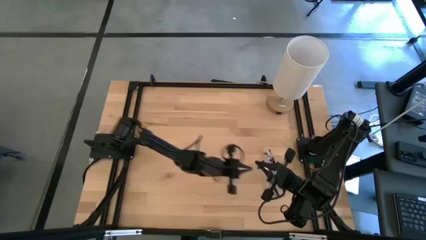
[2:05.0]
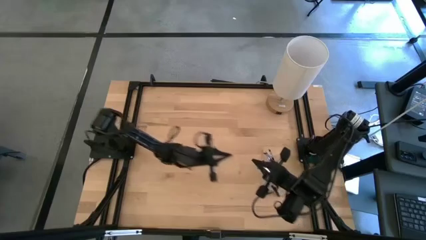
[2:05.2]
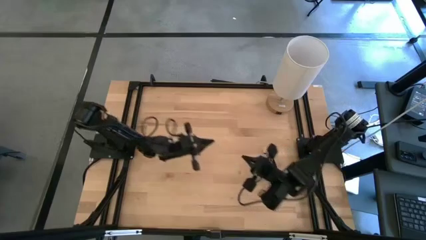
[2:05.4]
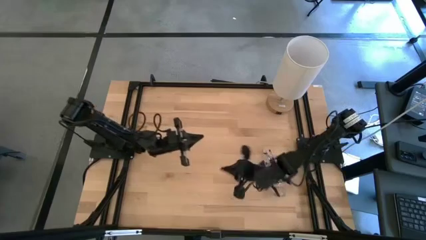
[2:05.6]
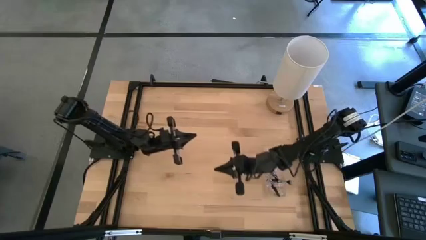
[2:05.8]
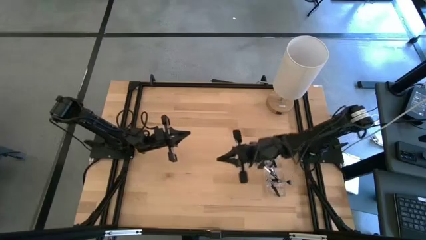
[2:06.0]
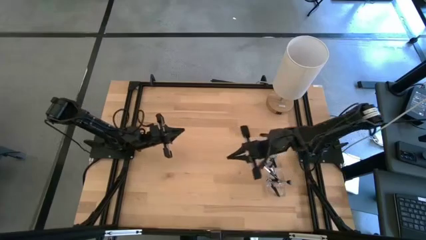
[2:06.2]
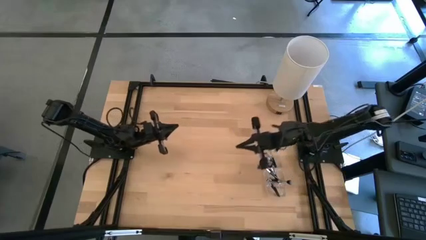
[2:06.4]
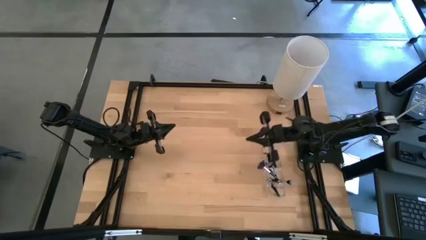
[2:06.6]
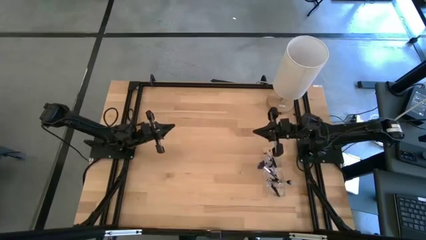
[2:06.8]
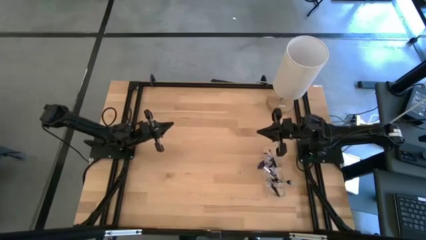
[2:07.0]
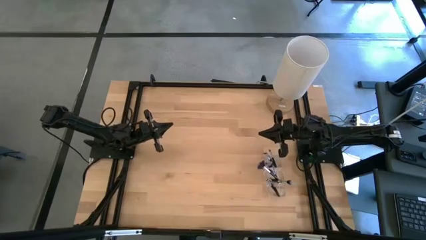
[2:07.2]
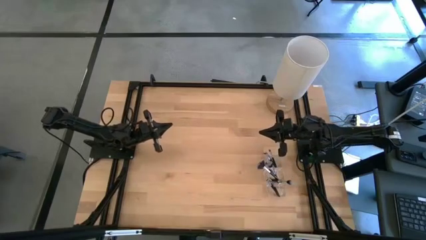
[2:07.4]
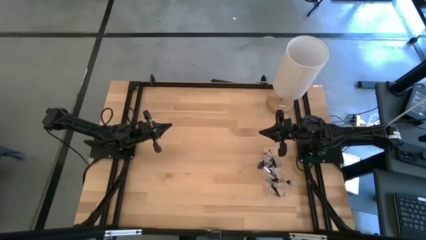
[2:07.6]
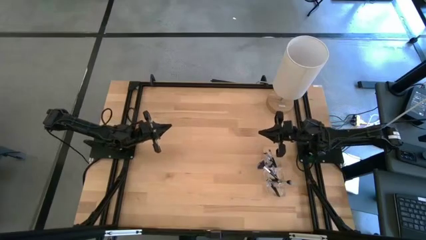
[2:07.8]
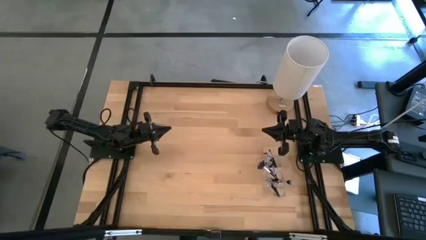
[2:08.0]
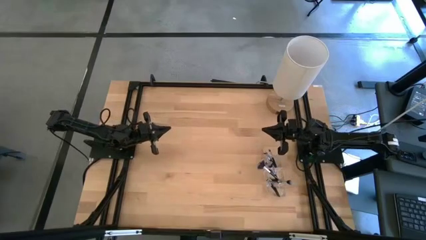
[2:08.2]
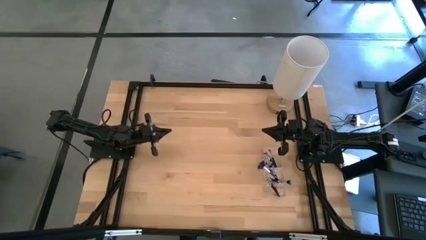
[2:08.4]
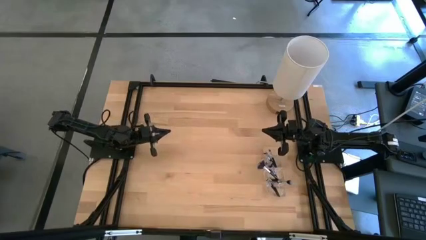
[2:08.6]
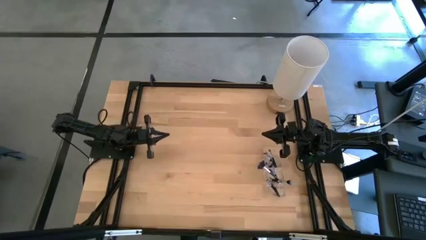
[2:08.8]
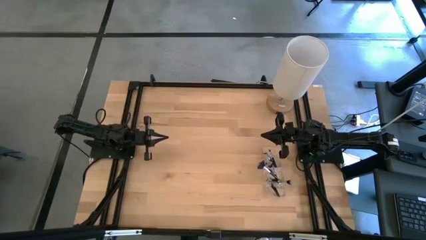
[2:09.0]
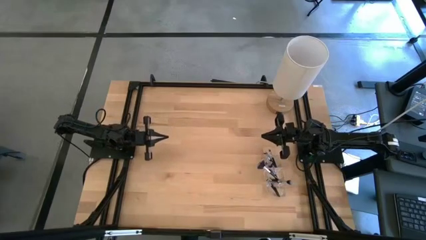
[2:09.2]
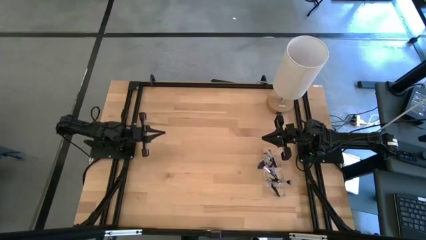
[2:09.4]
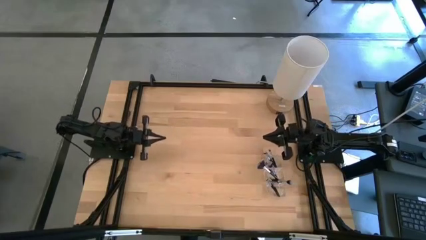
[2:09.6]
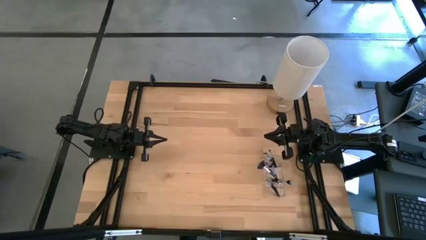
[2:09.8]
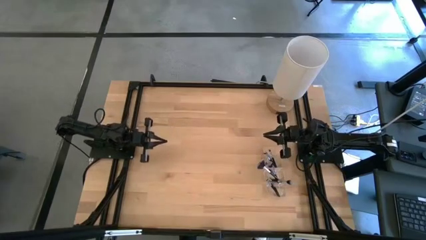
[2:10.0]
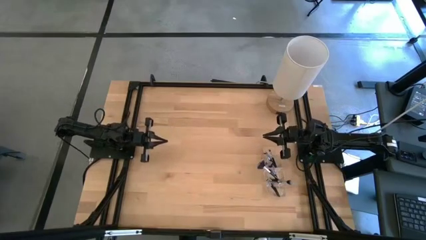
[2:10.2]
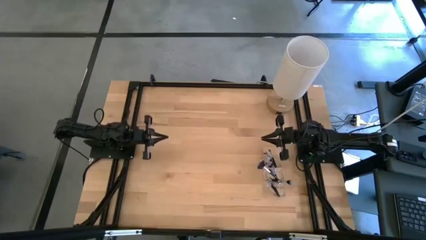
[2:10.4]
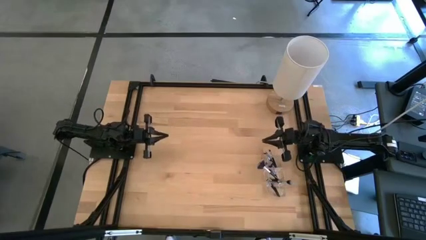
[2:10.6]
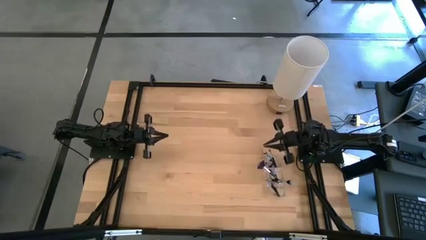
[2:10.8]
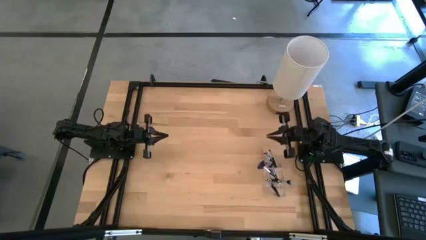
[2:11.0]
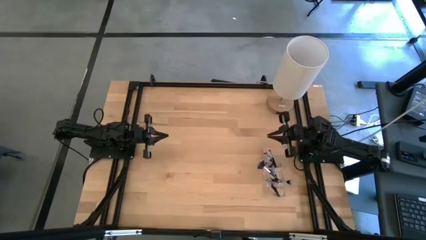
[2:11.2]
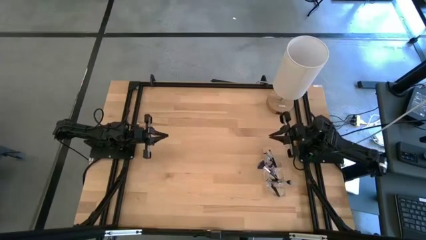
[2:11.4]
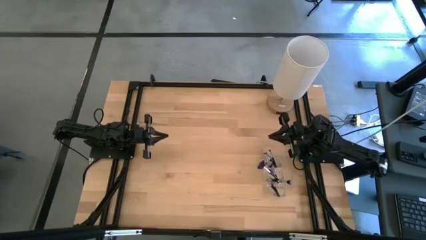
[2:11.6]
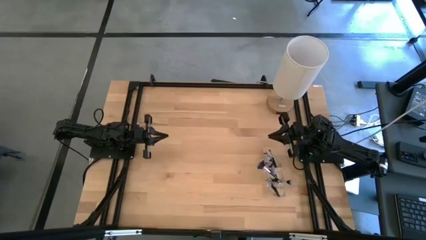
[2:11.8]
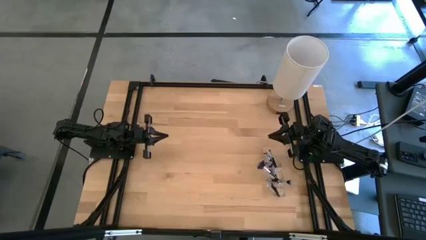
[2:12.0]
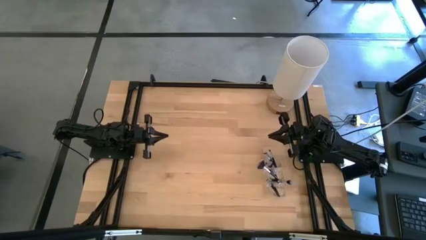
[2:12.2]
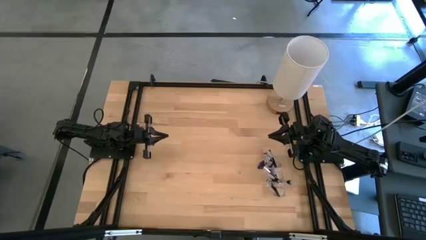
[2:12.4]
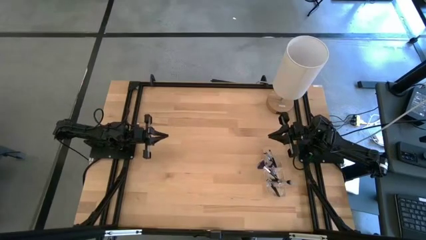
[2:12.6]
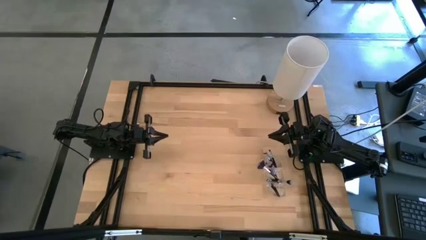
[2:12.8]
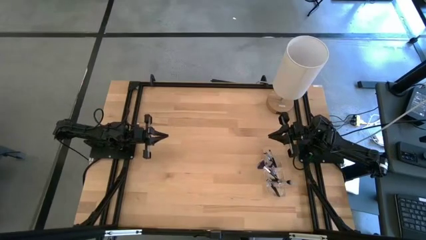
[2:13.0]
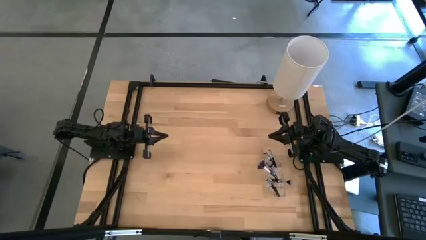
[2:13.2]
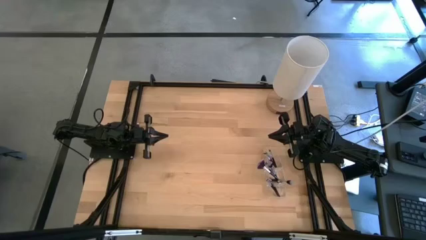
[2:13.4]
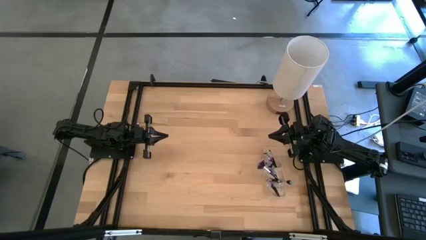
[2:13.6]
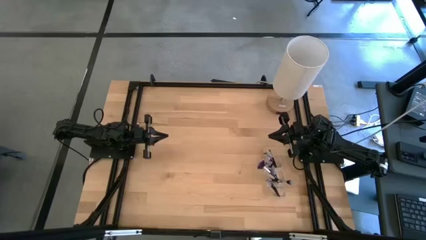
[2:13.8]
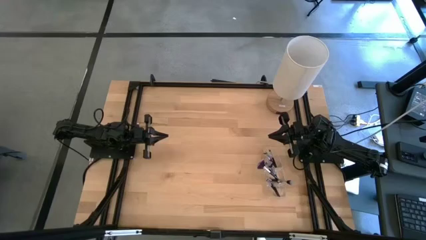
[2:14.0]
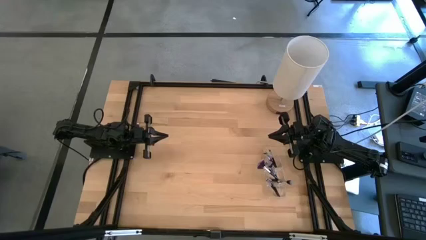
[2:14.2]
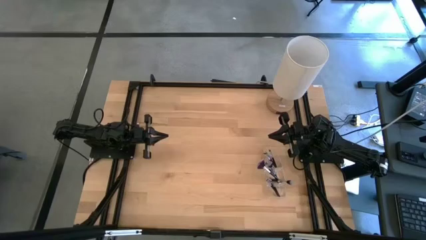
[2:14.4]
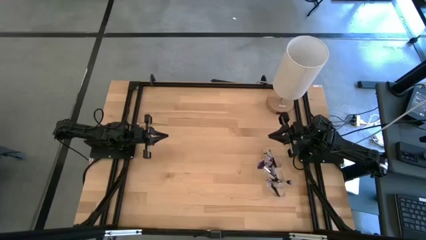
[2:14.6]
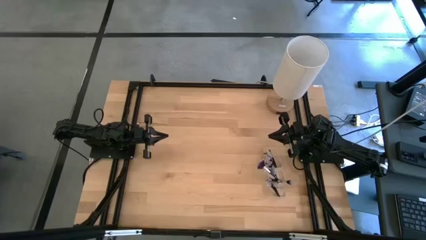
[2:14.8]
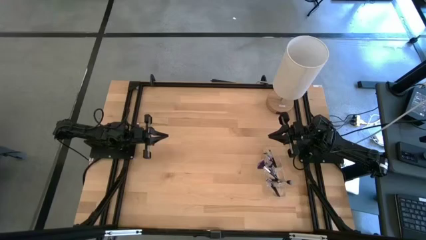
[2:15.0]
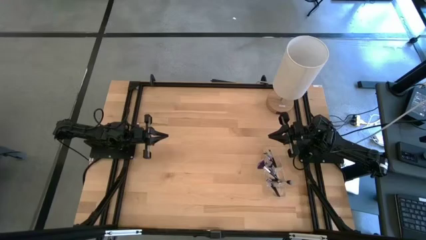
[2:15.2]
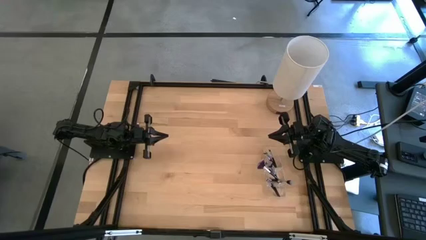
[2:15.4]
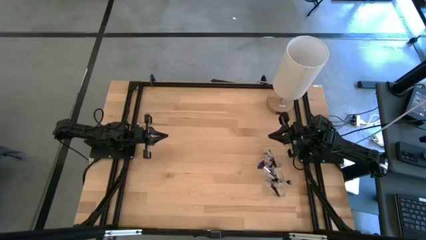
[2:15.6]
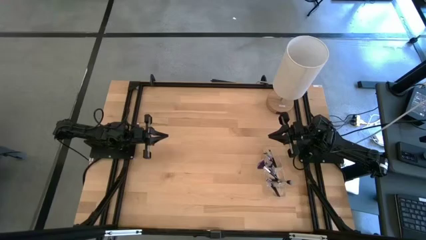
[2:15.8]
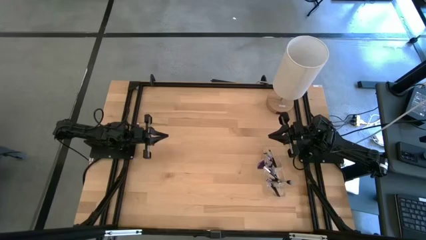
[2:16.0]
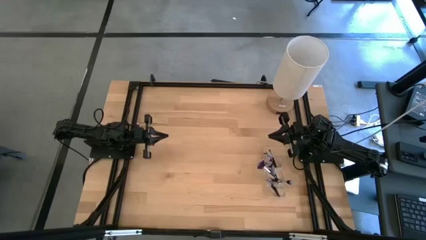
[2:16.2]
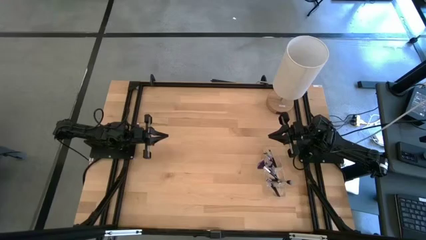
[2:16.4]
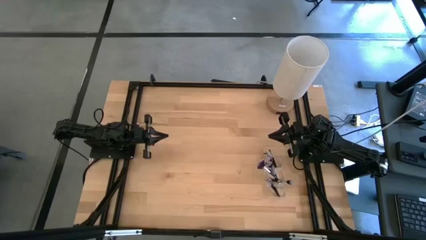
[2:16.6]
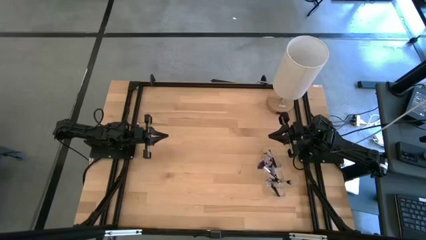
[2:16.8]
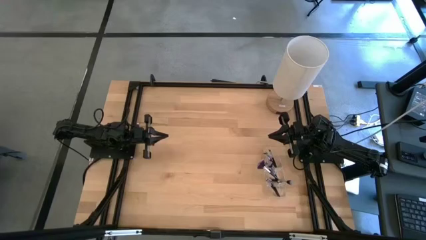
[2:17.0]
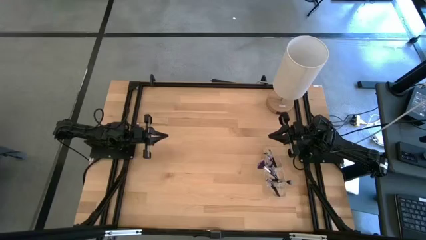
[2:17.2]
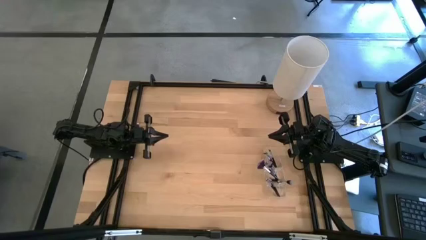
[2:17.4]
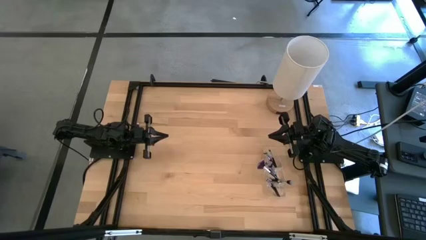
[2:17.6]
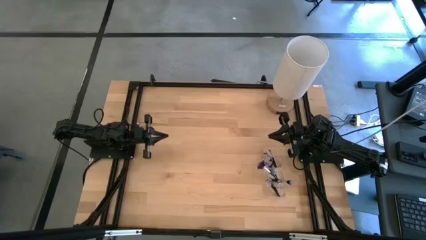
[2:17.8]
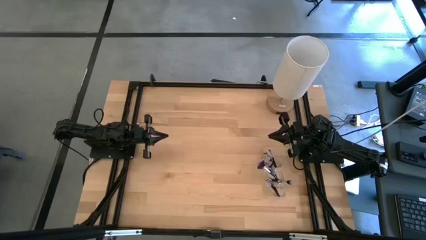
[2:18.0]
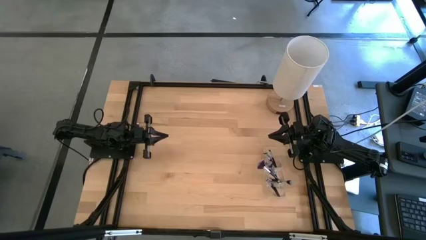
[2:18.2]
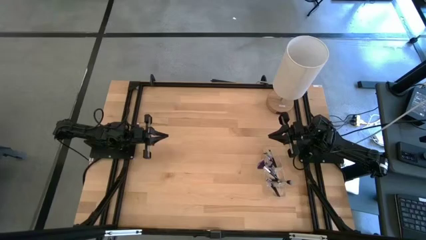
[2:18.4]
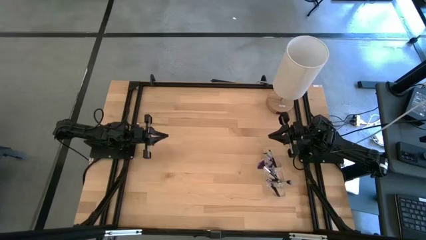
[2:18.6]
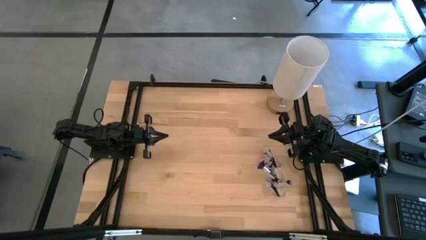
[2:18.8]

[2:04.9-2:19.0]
Task: Put items in baskets/containers
Return to Home Position
